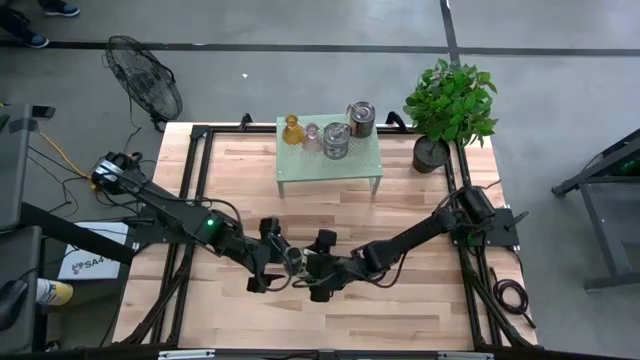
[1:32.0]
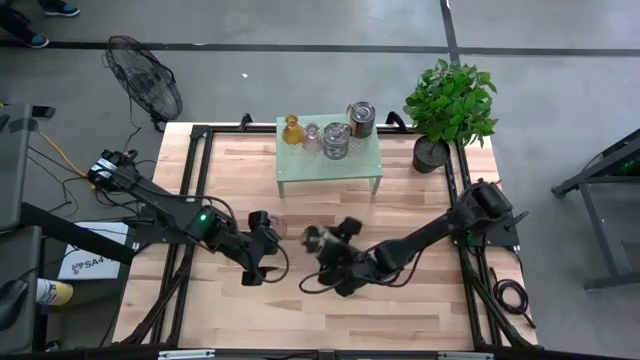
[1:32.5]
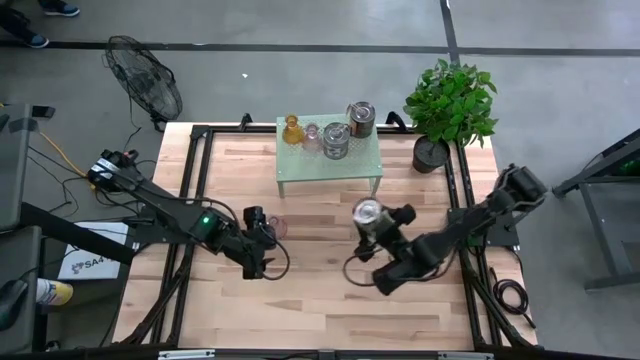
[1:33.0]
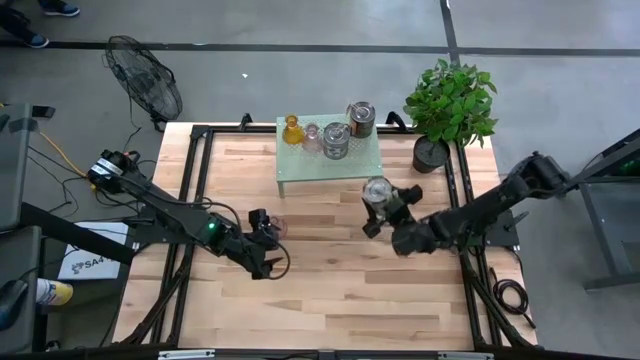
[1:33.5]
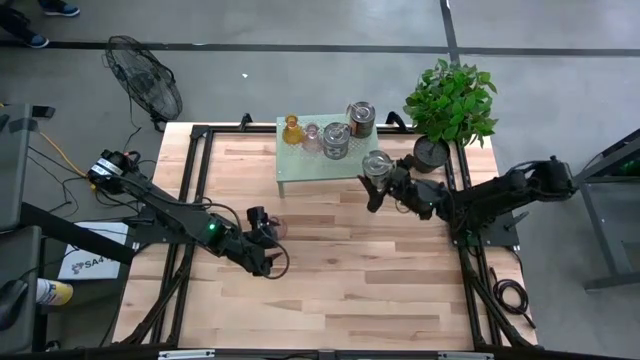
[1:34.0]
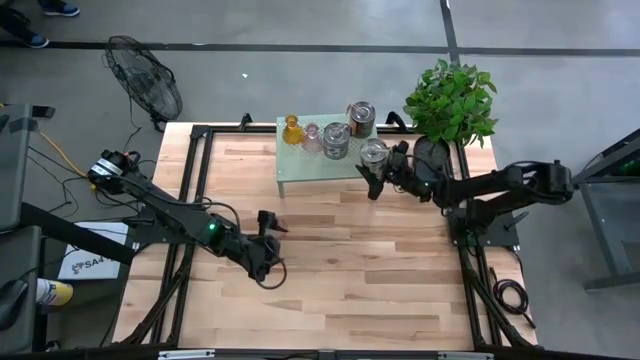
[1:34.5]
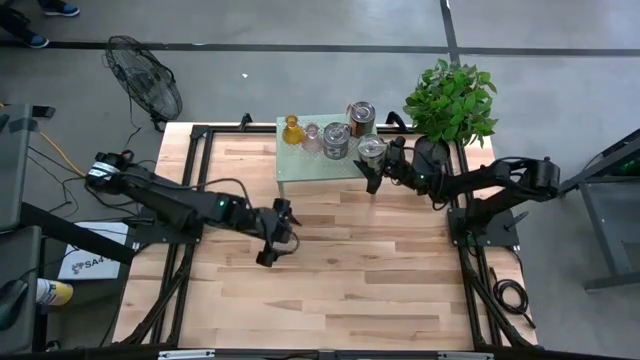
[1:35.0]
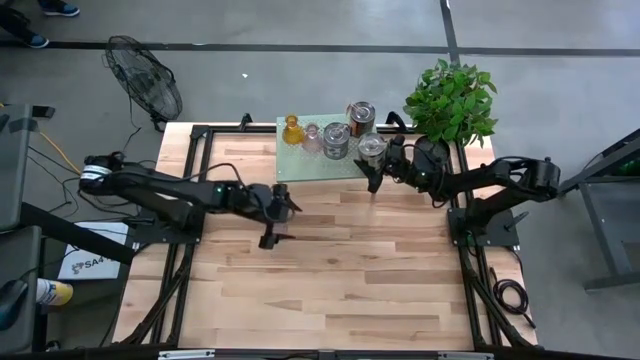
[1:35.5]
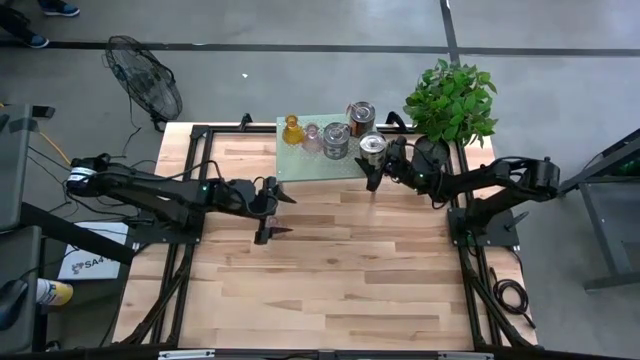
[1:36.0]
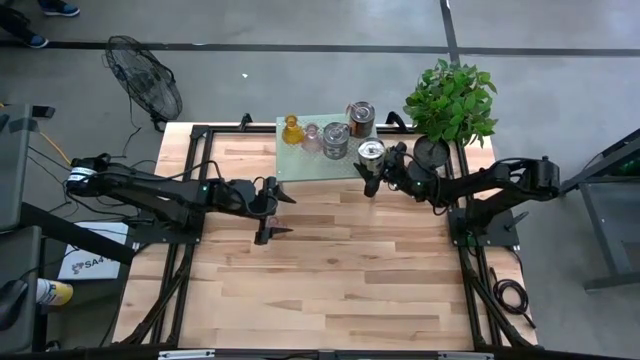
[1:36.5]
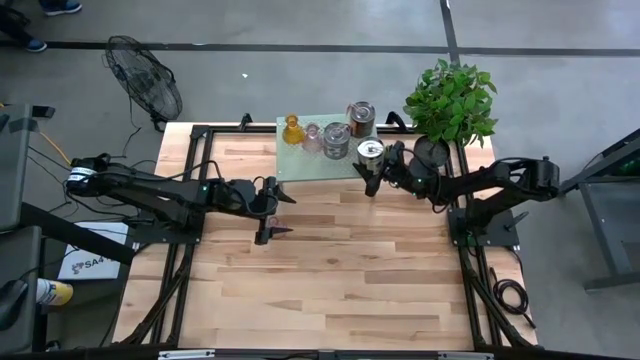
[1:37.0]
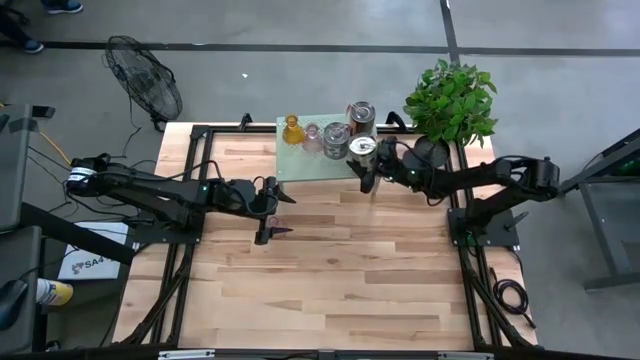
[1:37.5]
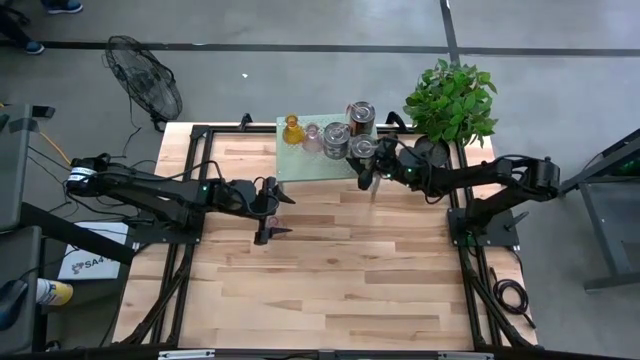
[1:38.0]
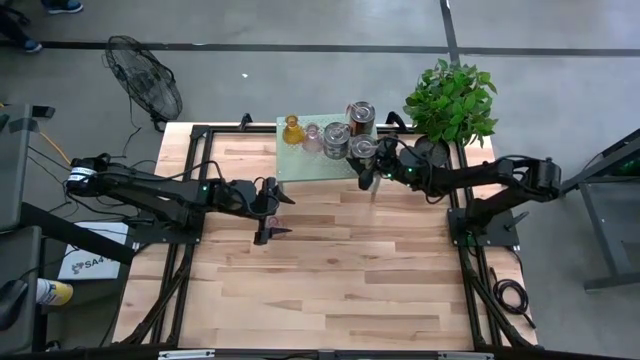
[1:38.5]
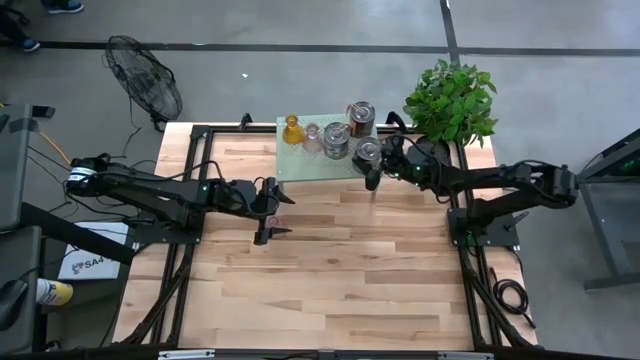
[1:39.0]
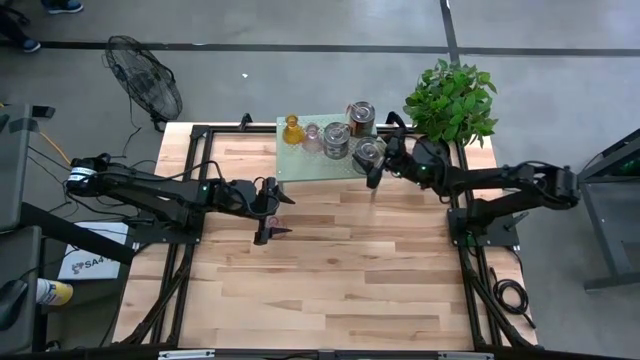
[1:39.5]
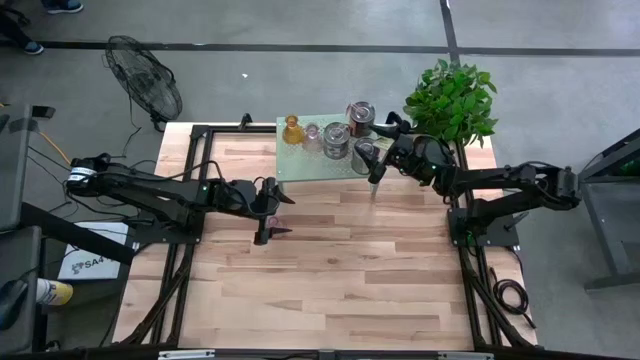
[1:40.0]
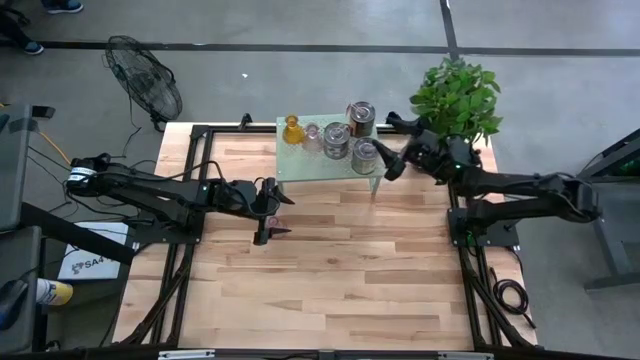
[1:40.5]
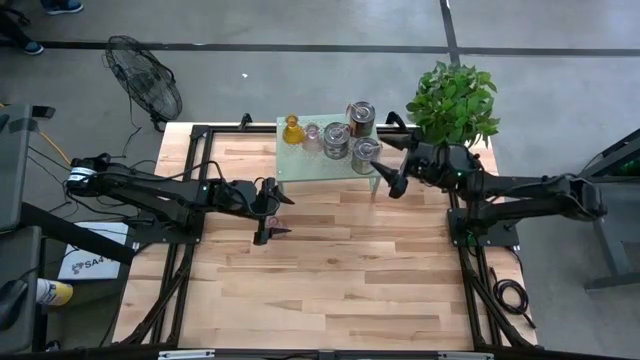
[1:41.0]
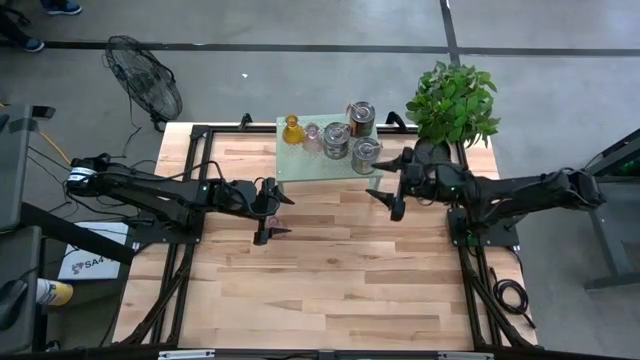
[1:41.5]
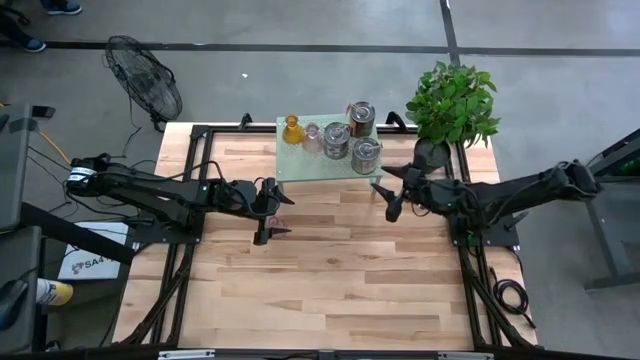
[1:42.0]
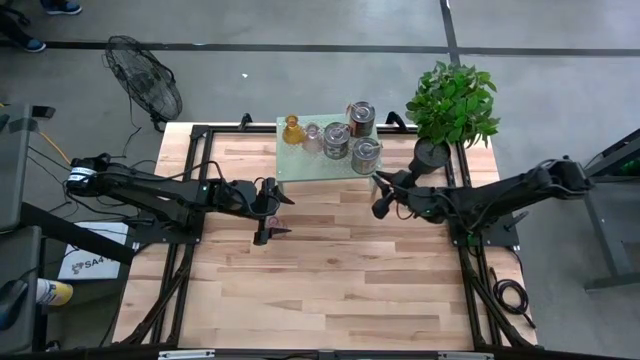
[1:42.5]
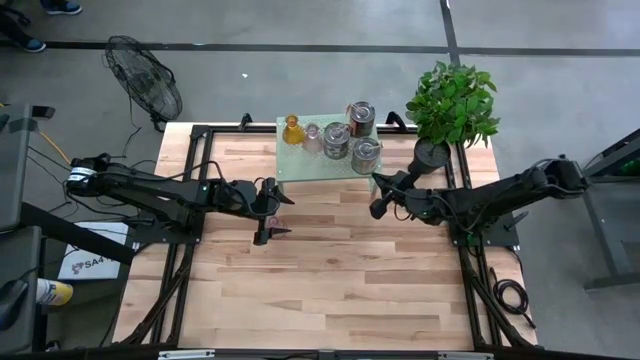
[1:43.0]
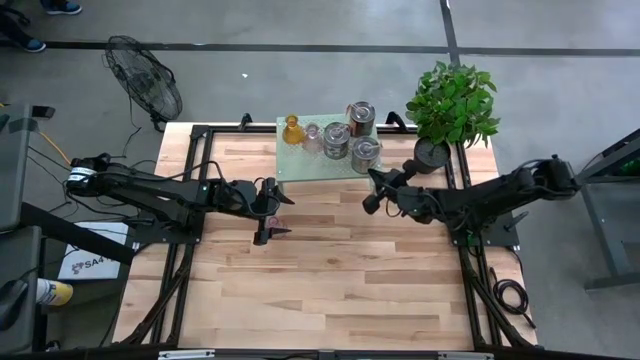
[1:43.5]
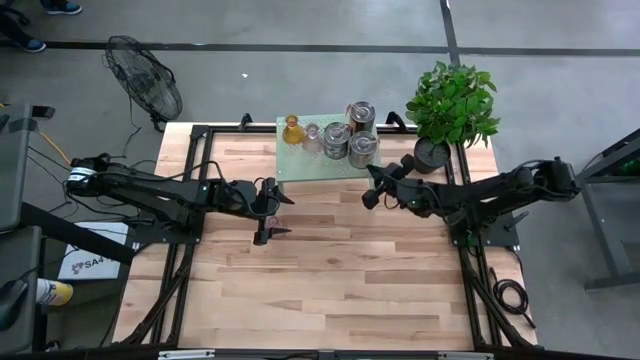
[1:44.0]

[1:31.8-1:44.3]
Task: Pick & Place candle stick holders
Put the silver candle on the shelf
